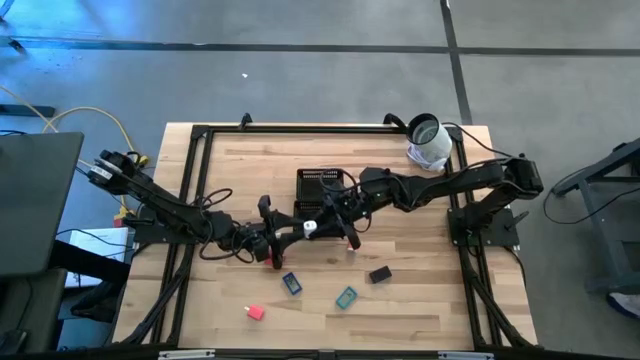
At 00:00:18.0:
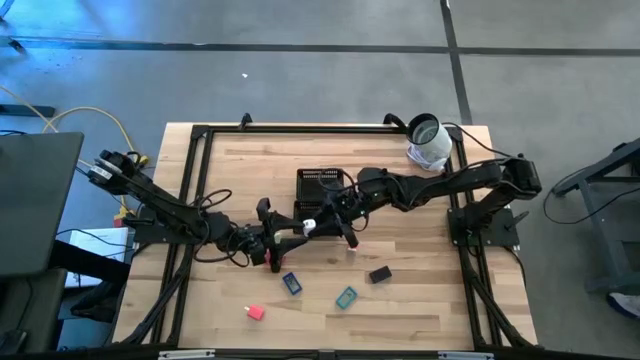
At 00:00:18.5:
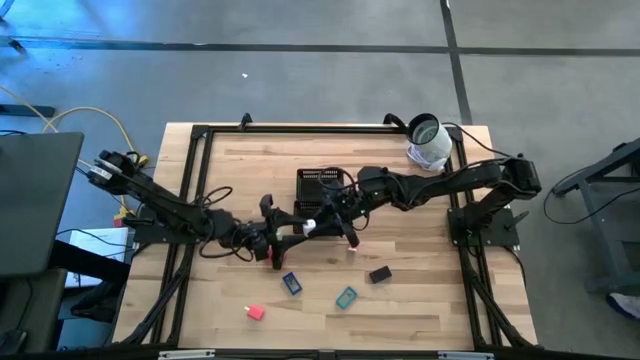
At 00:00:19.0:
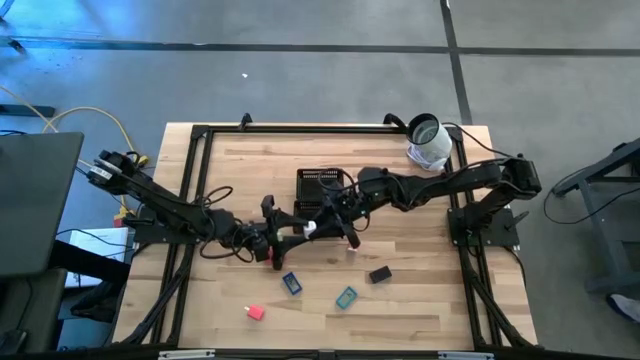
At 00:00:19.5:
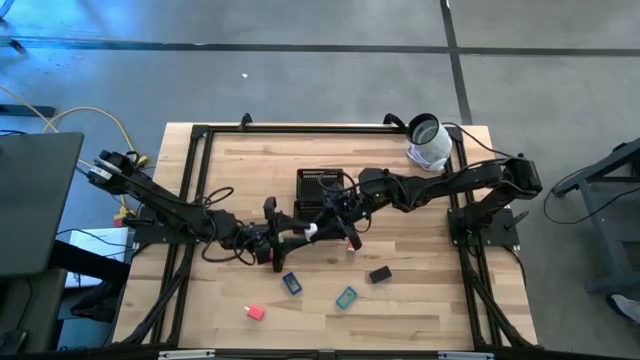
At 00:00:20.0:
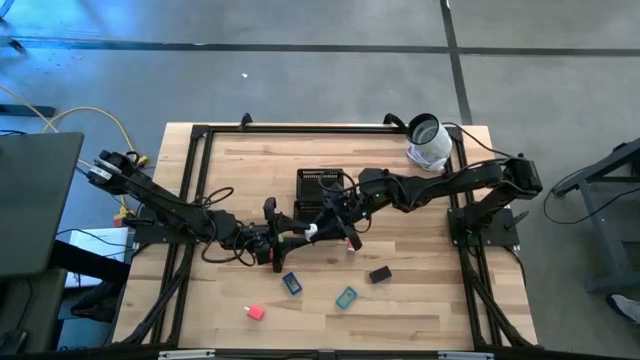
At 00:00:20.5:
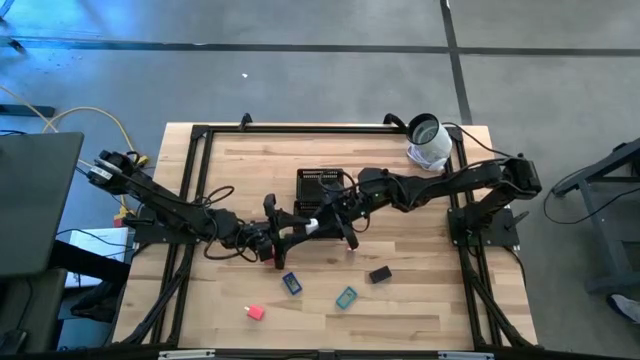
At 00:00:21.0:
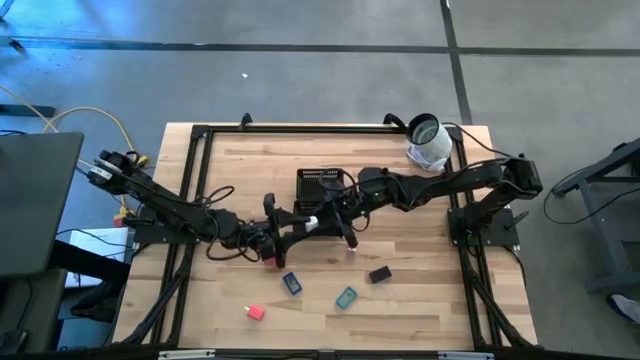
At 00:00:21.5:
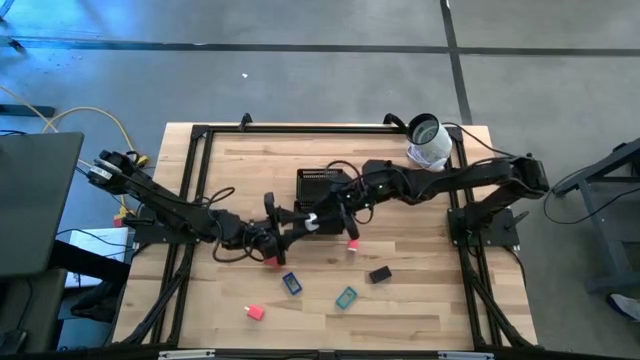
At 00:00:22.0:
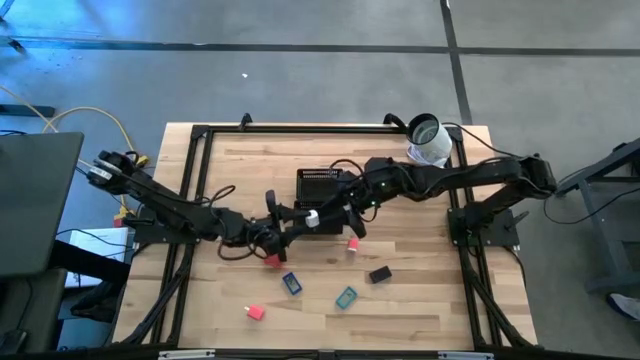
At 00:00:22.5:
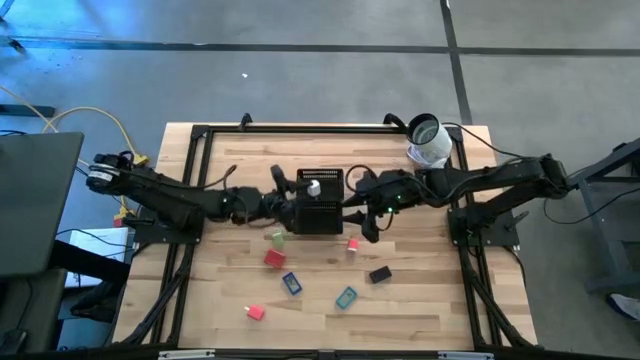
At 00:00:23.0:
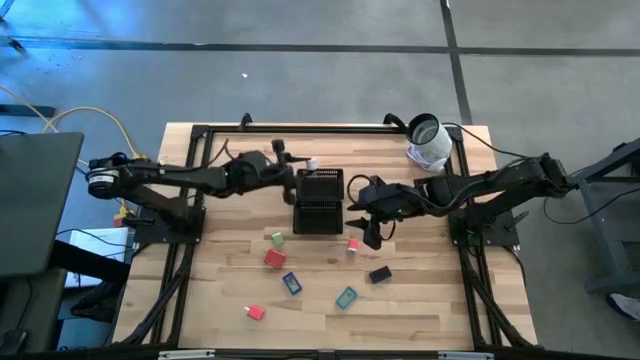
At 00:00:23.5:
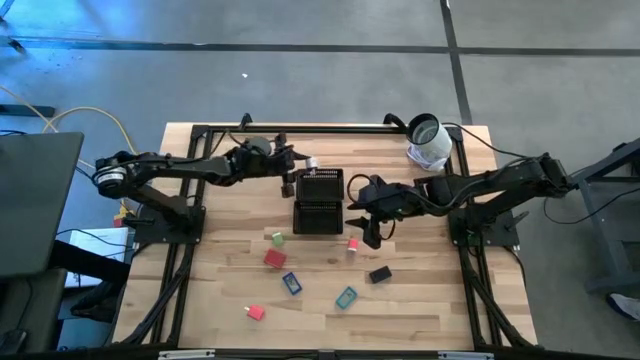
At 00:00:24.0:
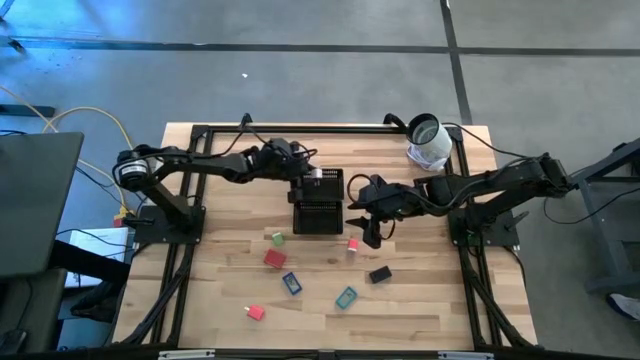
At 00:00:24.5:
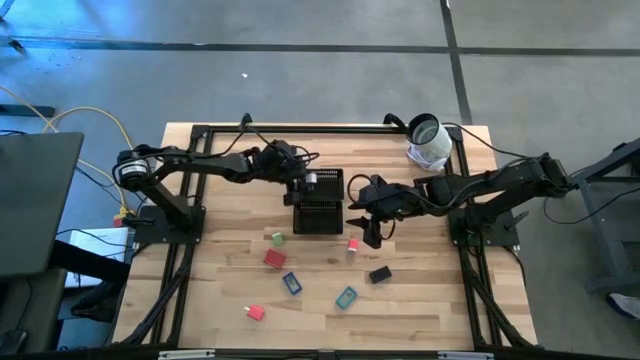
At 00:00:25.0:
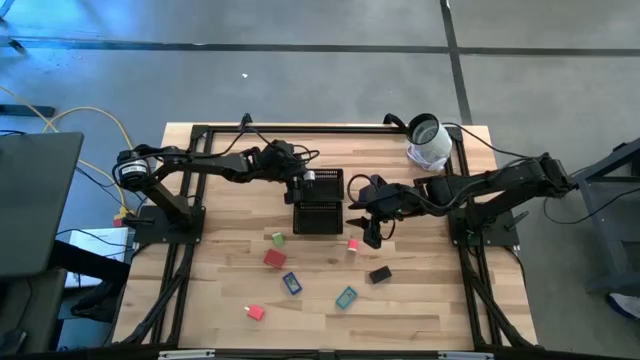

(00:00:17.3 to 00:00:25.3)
Task: Pick & Place Office items
Put the white charger adapter into the top black bin

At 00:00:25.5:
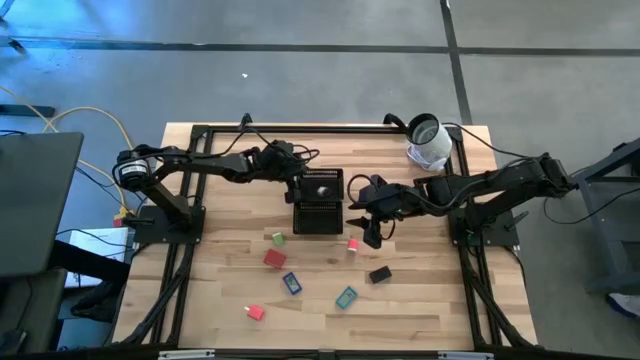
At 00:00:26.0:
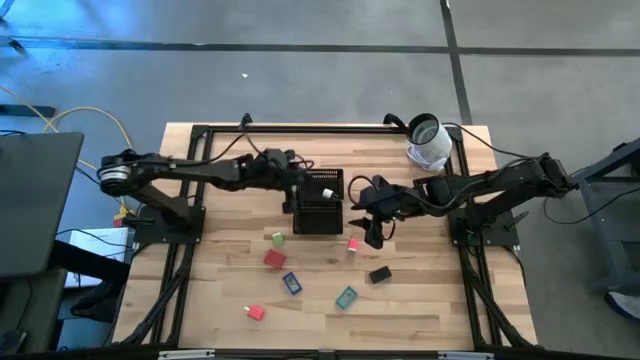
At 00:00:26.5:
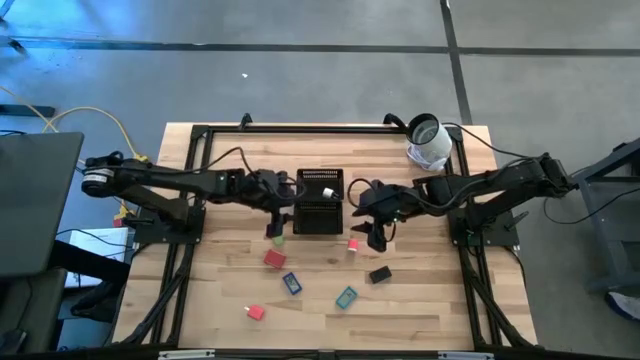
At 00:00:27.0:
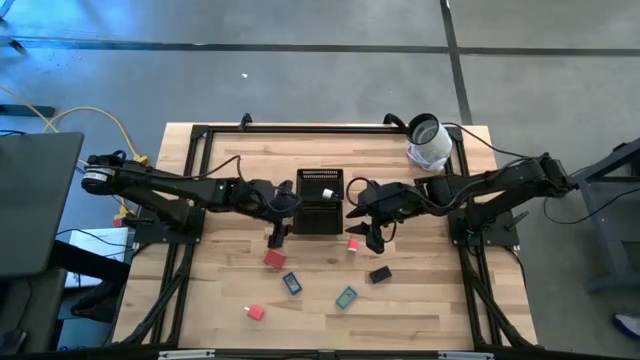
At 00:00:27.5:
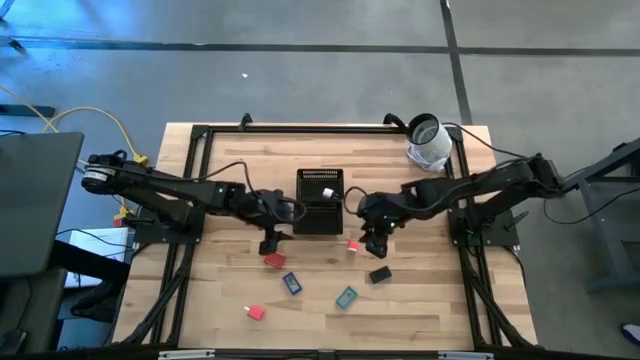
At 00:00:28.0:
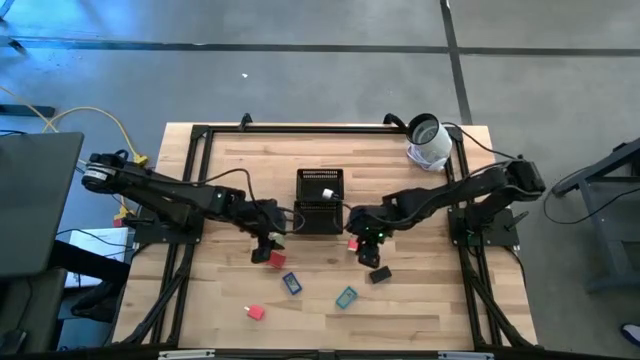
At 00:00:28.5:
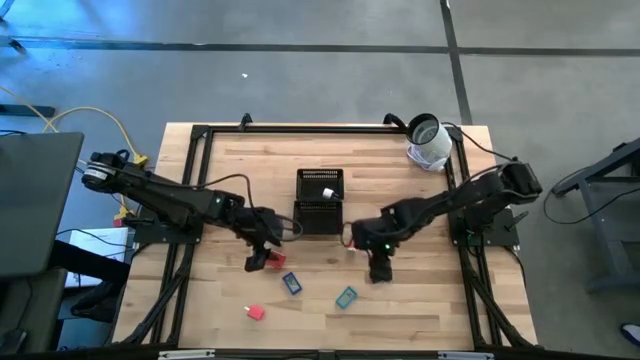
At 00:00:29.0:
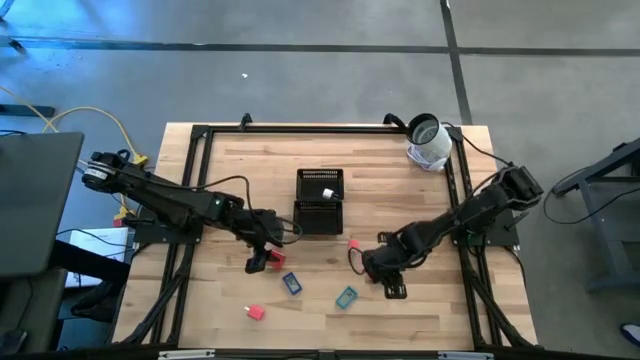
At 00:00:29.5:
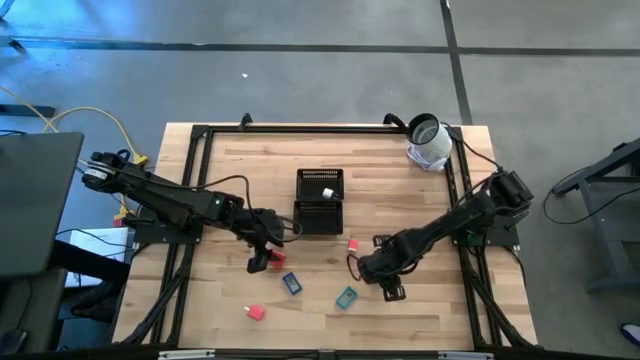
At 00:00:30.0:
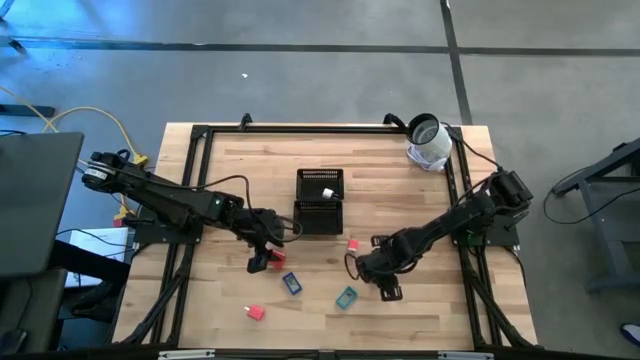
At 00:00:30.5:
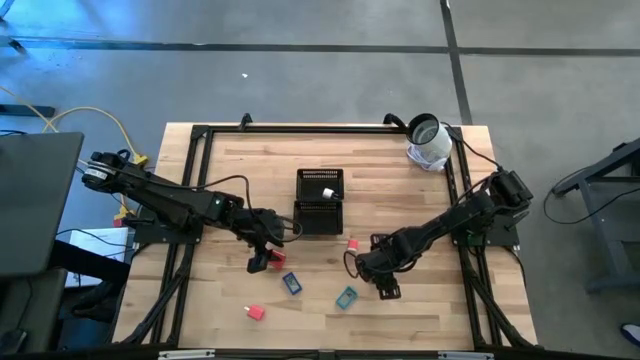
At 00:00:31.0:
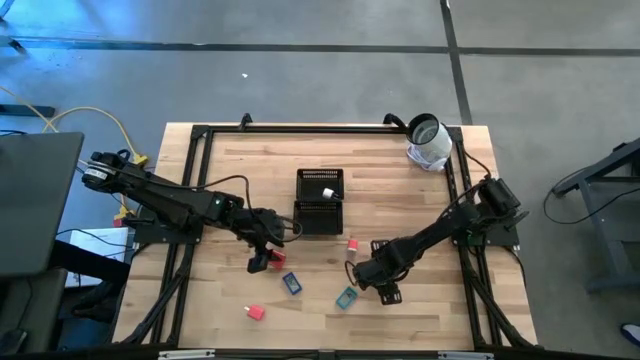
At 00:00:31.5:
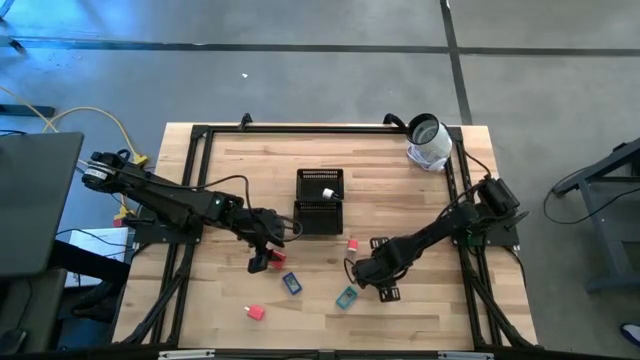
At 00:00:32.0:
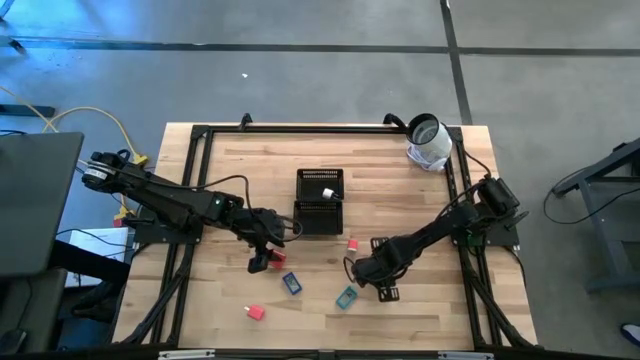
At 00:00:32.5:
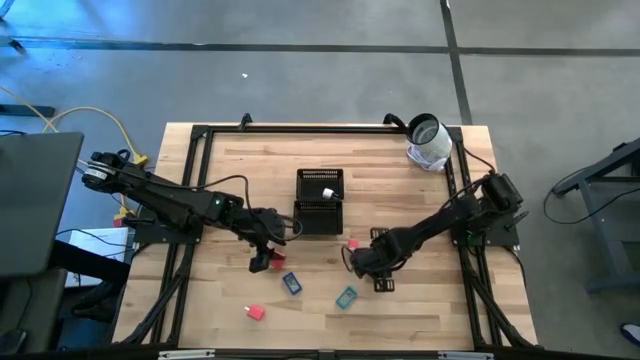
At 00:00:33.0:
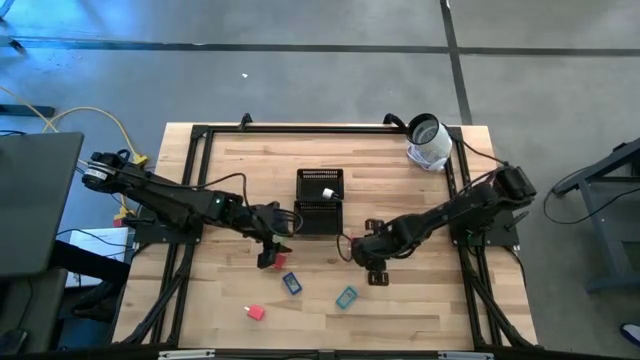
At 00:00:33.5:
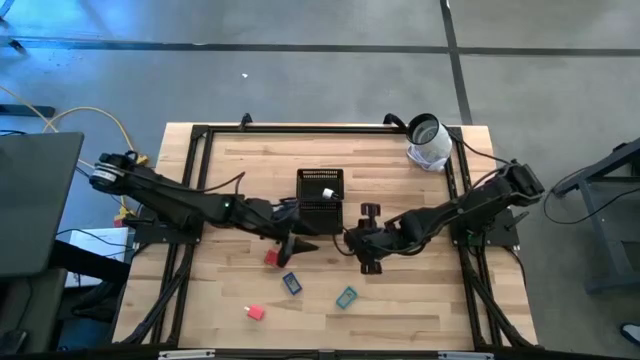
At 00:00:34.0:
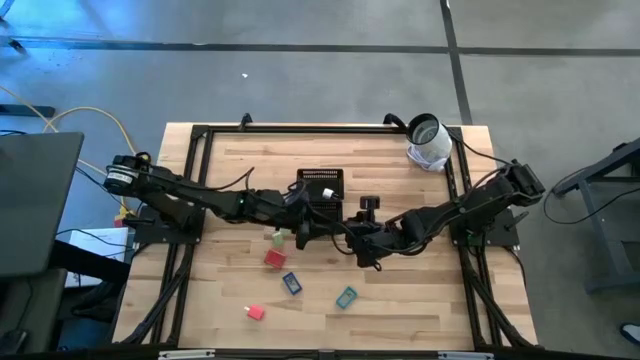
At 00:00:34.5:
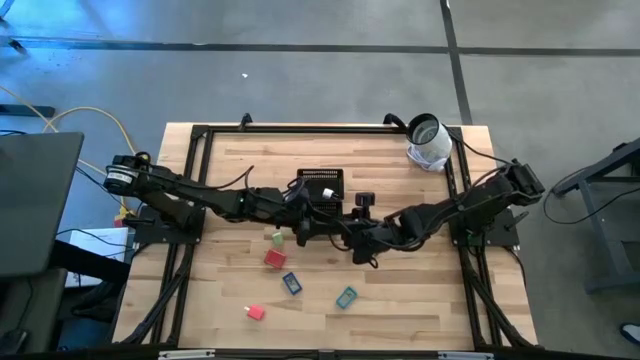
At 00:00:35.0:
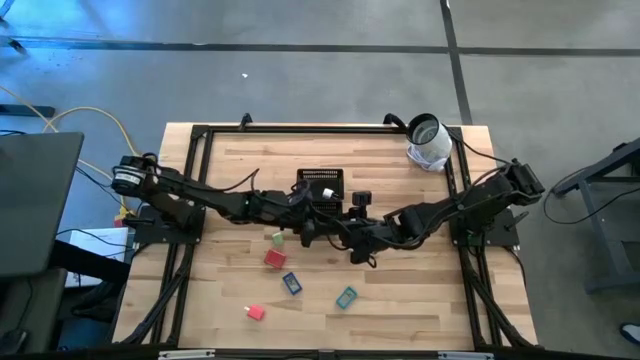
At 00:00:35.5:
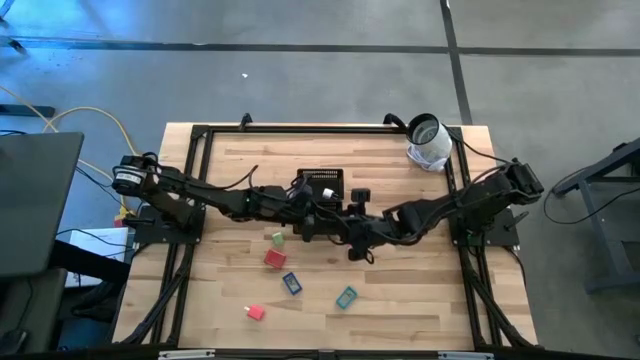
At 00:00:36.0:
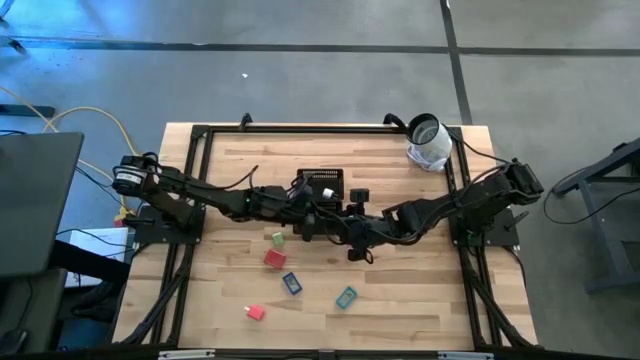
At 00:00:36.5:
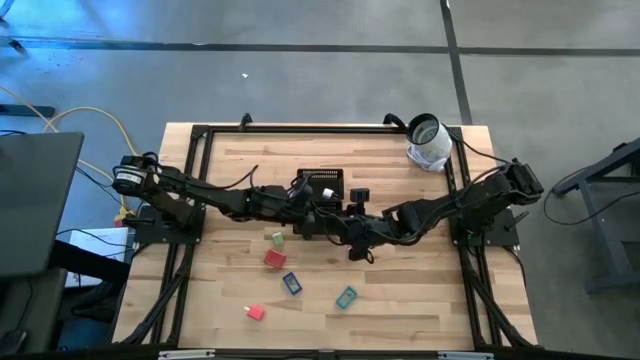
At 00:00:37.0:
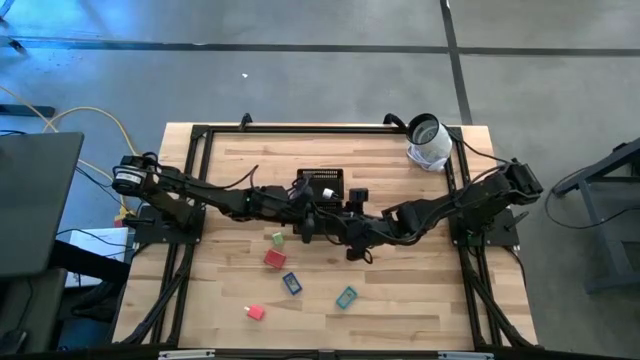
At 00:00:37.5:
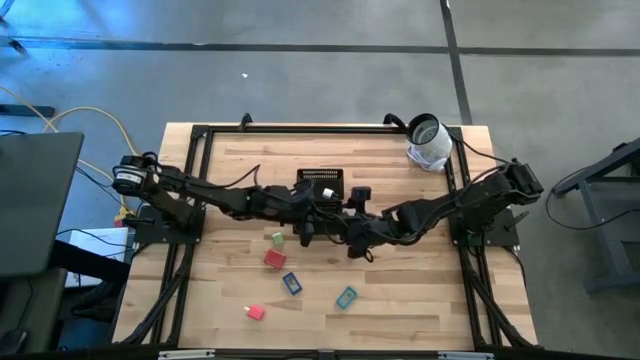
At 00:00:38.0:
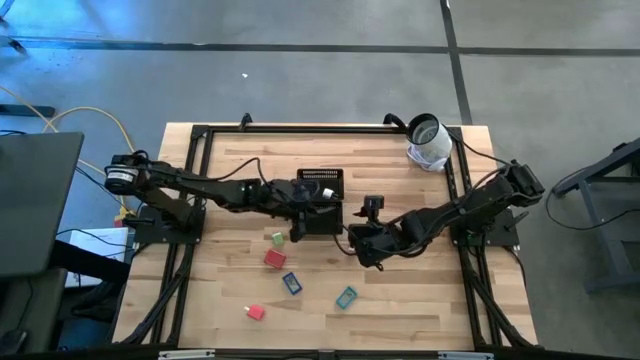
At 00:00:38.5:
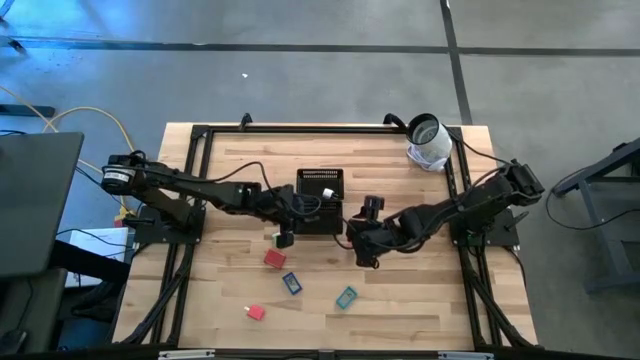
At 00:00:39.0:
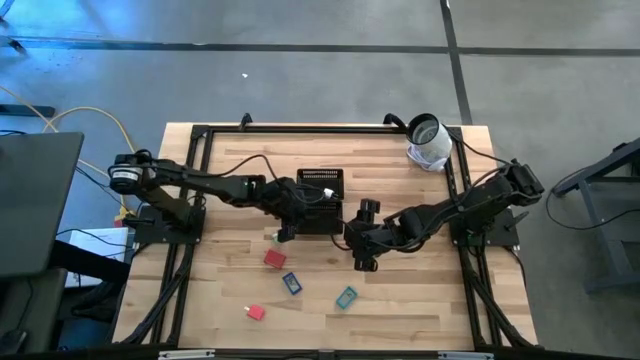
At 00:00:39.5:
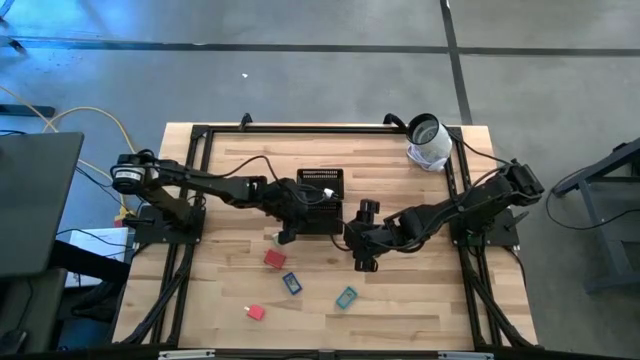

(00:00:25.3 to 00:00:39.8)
Put the black digital clock into the bottom black bin
